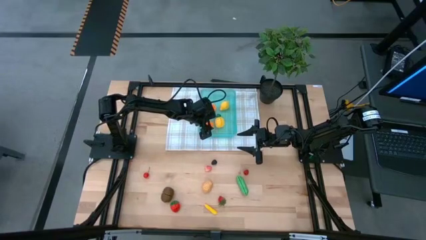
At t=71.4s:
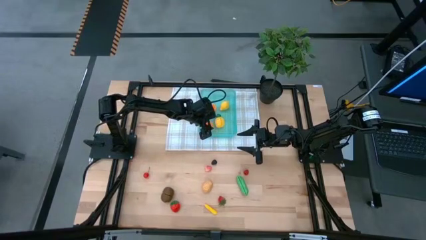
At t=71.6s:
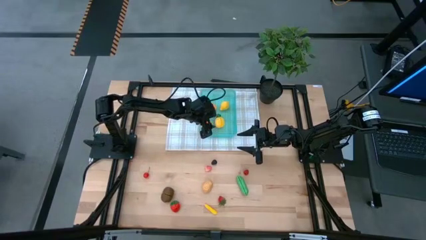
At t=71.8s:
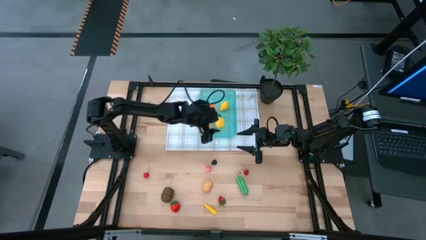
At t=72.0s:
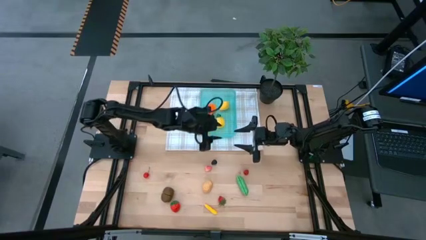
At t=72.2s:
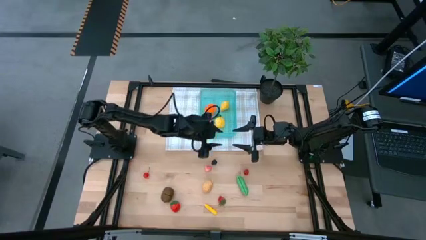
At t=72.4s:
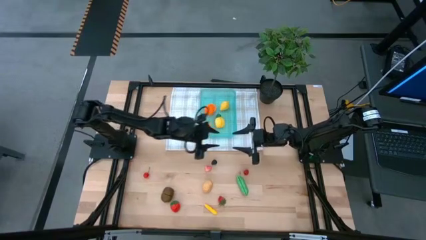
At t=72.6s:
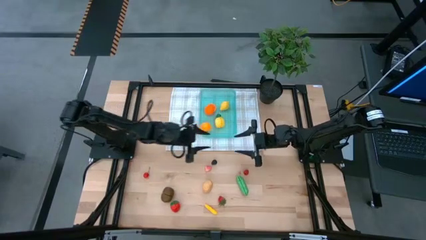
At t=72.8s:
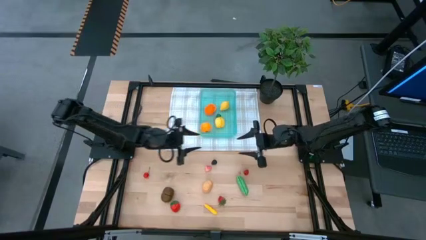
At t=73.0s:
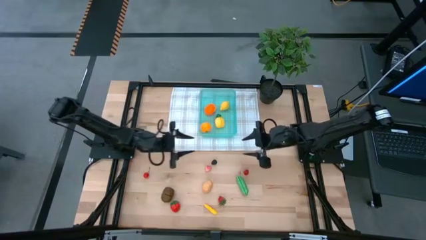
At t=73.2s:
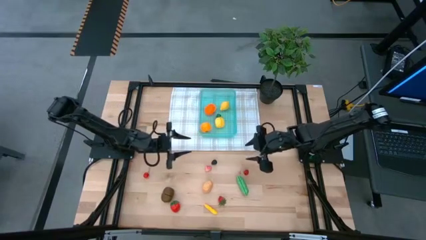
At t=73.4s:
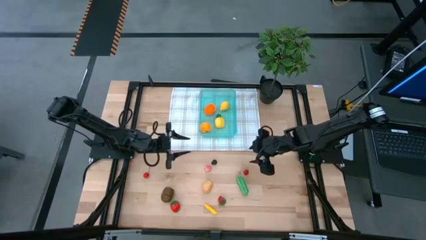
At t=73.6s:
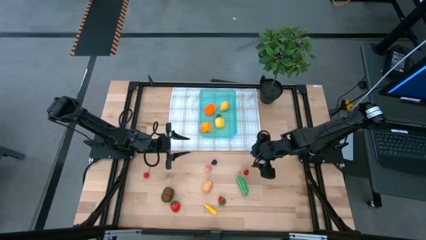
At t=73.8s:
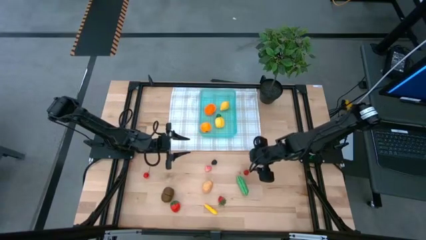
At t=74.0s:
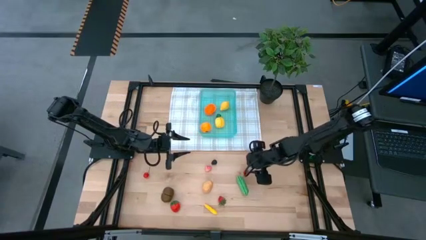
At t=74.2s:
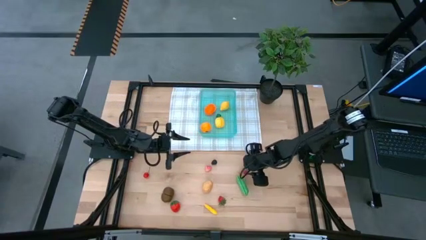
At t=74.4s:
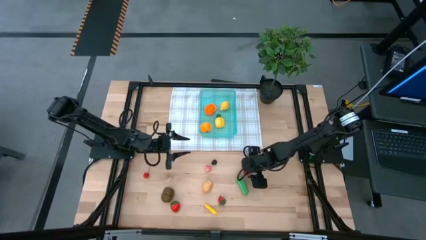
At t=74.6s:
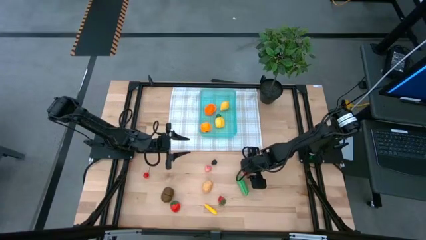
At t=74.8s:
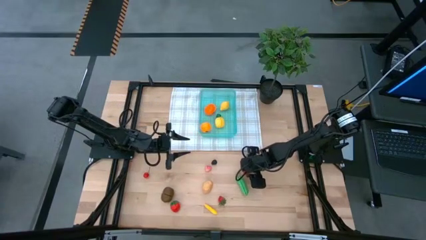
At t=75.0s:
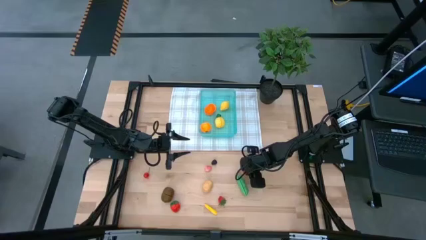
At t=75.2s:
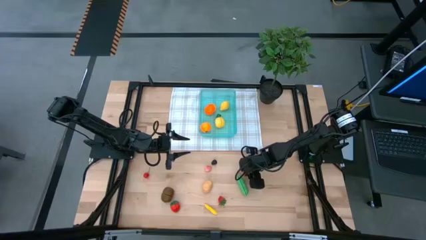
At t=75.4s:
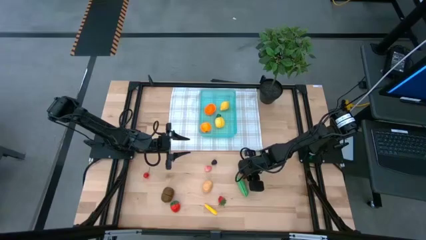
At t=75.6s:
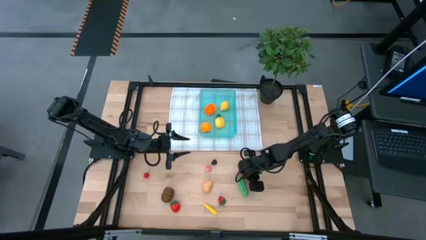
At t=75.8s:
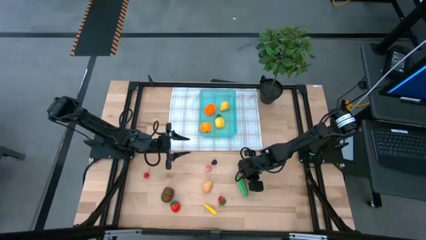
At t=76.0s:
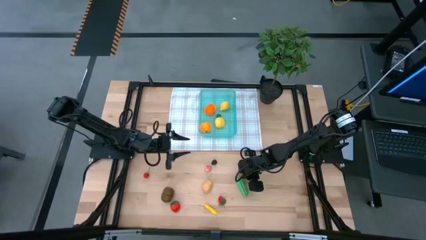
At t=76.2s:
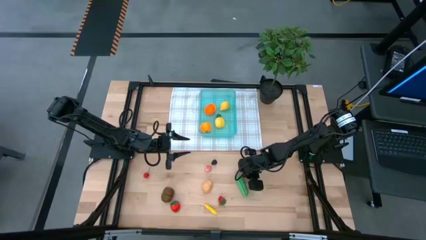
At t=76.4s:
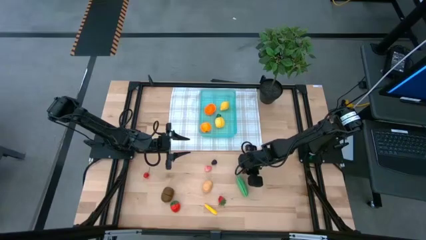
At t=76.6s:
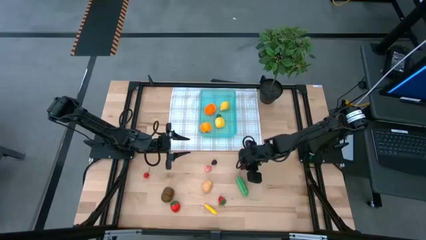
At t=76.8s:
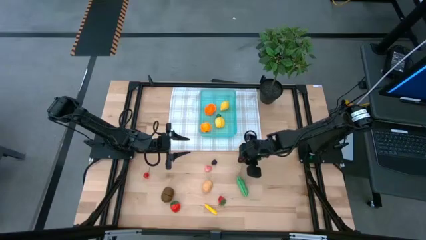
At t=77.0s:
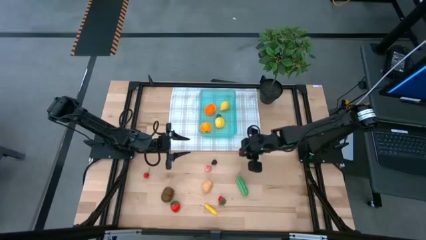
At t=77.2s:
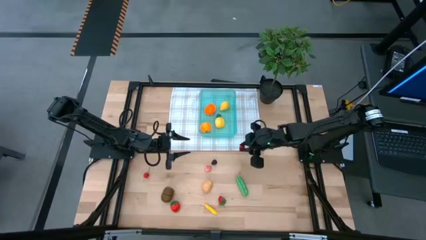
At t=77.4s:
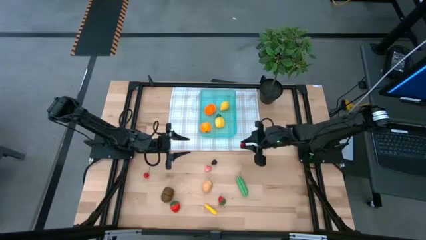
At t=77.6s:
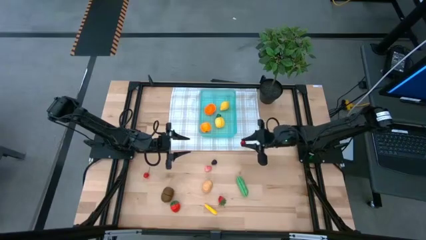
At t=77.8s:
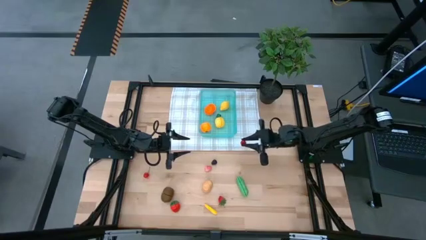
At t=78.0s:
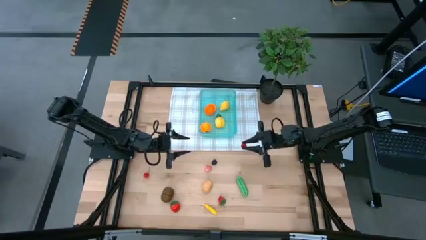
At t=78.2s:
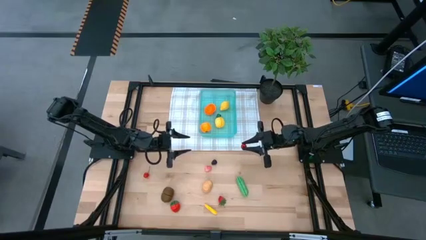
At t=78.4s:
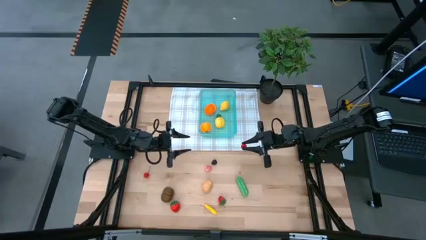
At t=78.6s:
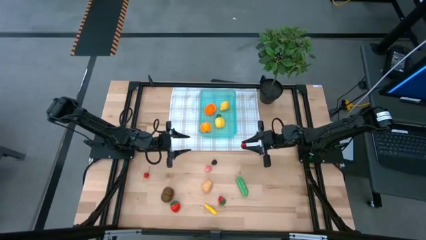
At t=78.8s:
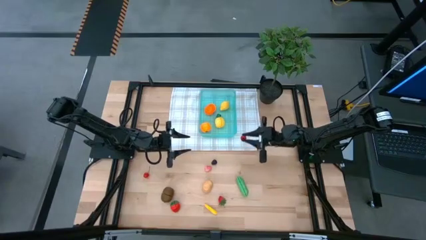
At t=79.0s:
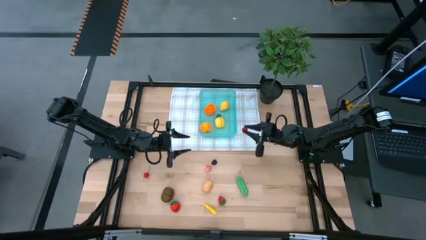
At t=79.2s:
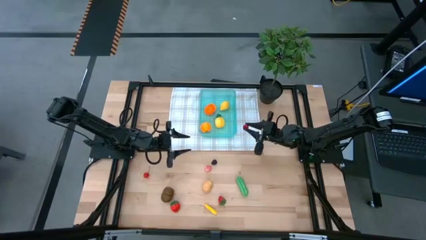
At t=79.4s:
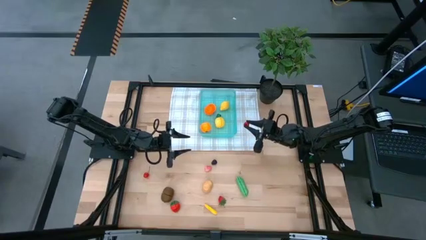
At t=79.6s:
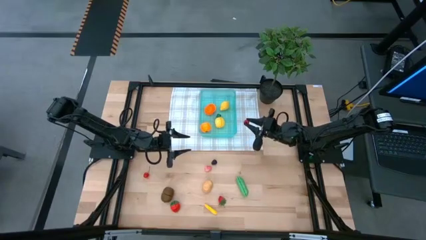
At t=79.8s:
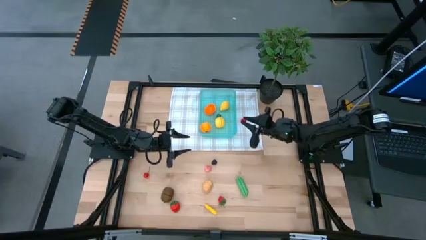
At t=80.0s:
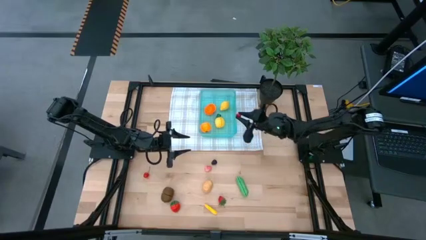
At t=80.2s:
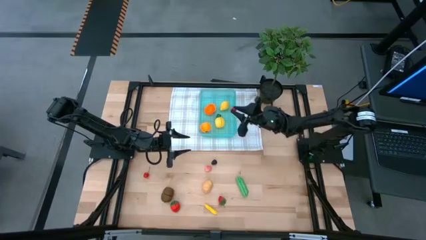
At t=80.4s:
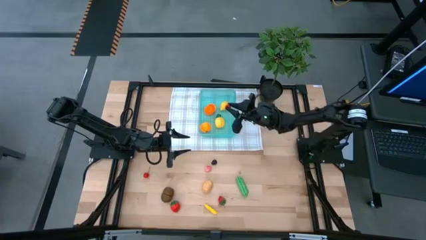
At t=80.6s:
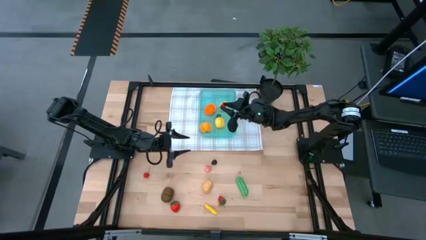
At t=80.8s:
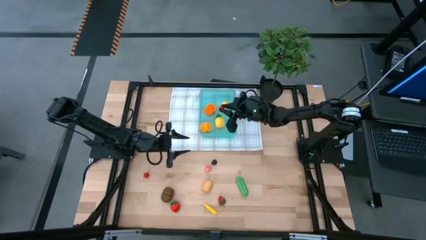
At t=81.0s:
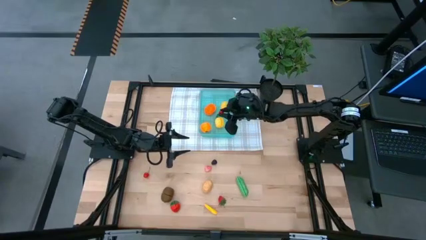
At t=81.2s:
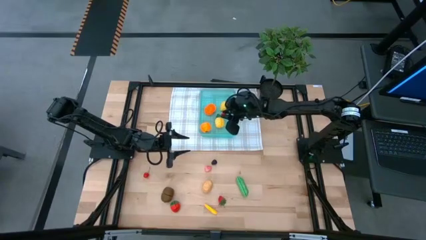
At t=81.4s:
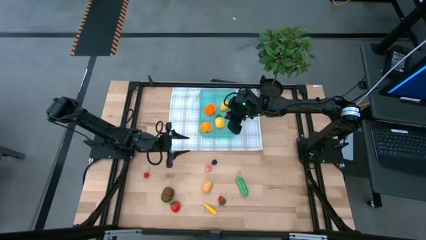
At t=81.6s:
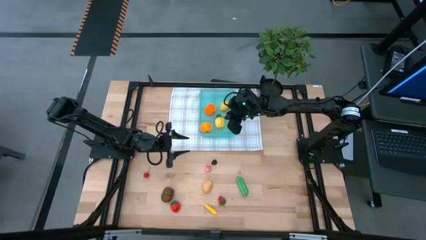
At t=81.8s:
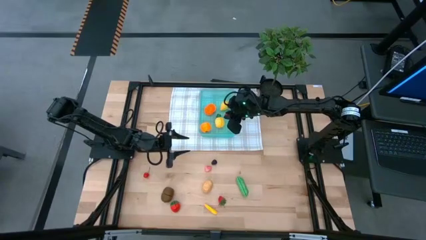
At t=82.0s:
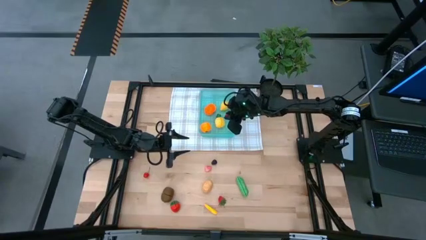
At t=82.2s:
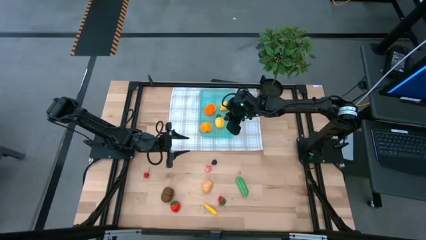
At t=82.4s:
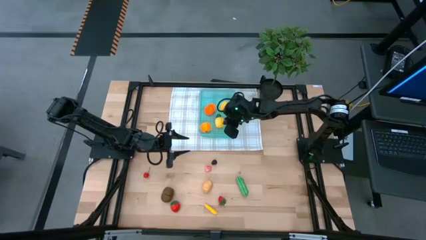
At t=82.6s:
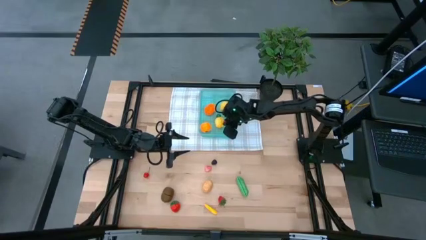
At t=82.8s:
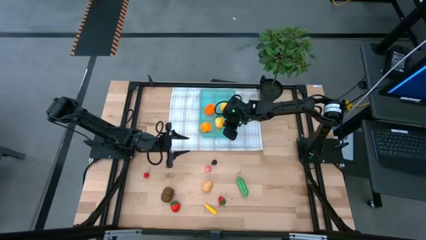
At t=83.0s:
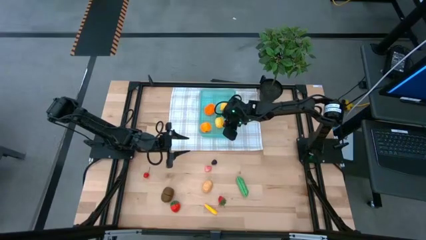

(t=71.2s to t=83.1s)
Task: Pick and placing Produce into tupperware
Put the red raspberry into the green bin

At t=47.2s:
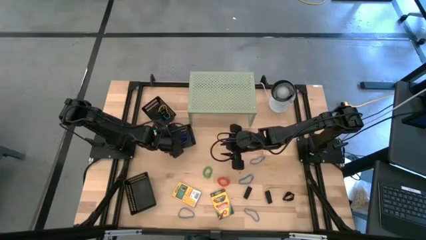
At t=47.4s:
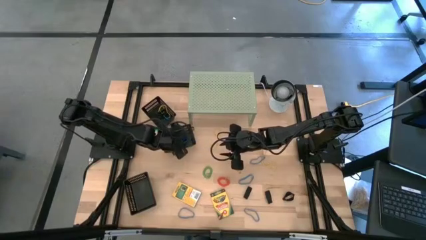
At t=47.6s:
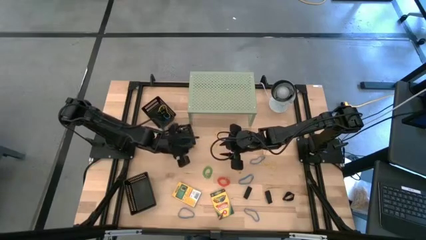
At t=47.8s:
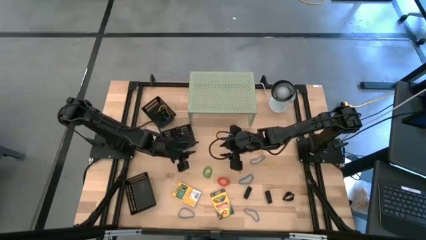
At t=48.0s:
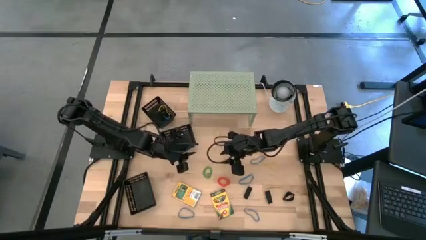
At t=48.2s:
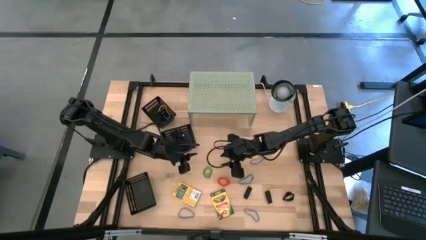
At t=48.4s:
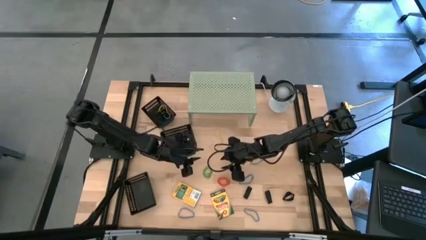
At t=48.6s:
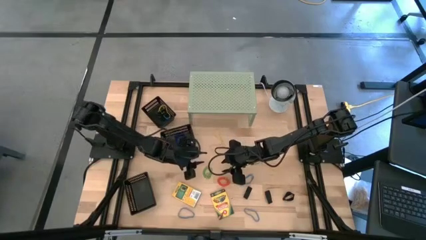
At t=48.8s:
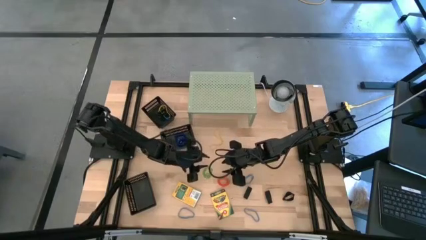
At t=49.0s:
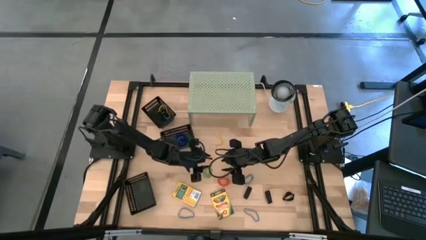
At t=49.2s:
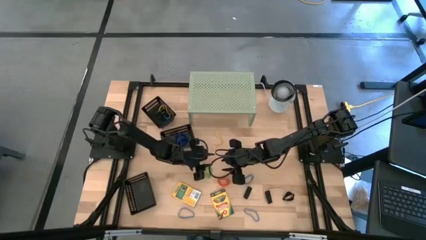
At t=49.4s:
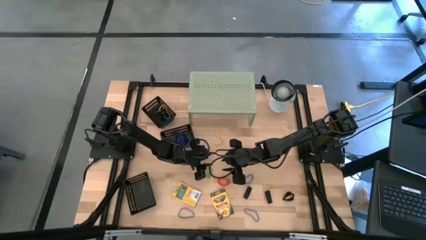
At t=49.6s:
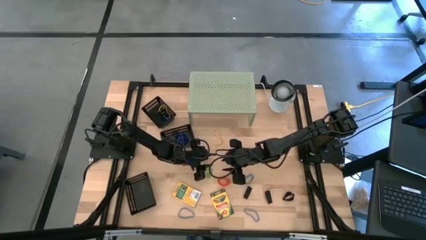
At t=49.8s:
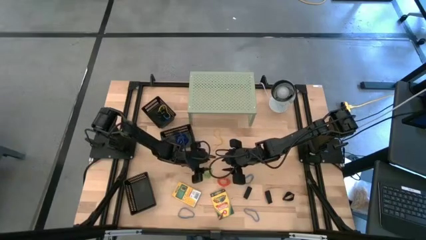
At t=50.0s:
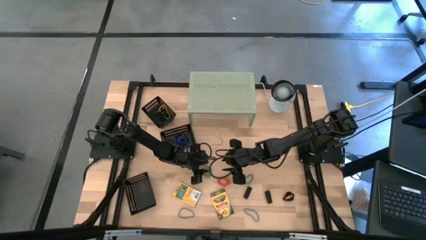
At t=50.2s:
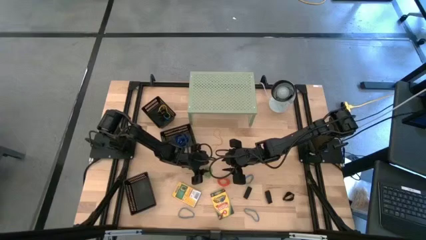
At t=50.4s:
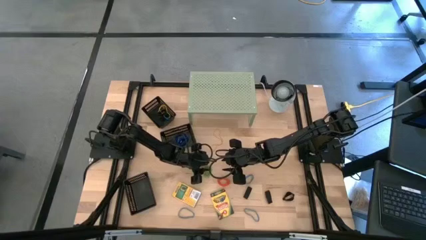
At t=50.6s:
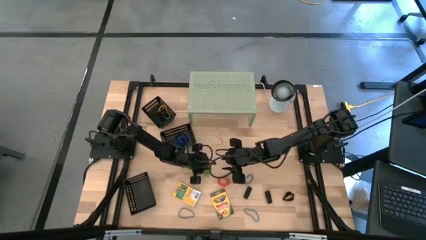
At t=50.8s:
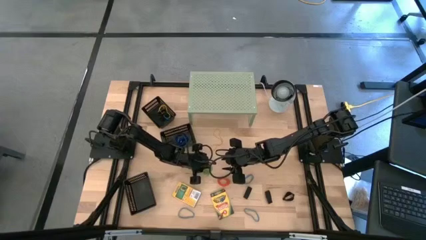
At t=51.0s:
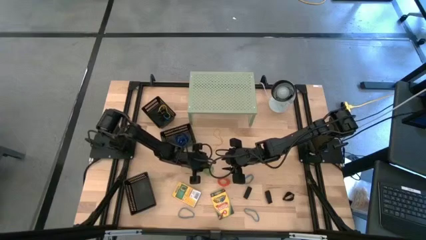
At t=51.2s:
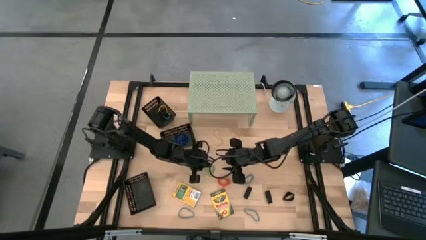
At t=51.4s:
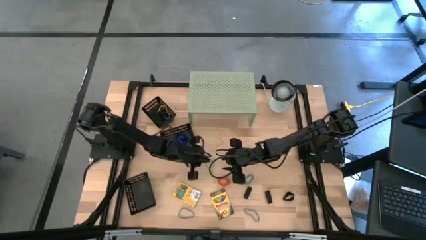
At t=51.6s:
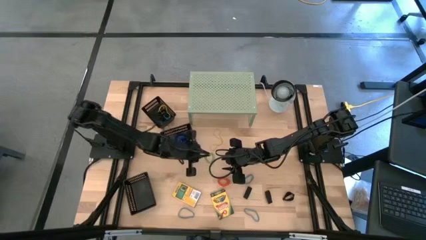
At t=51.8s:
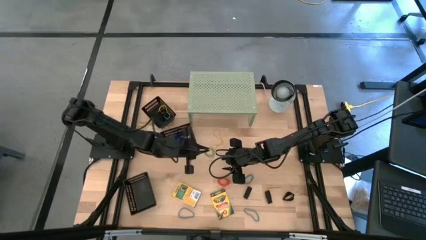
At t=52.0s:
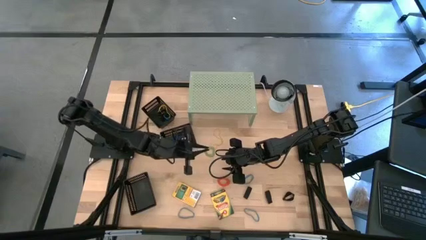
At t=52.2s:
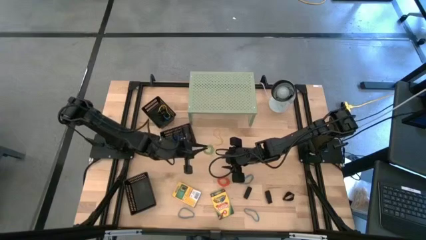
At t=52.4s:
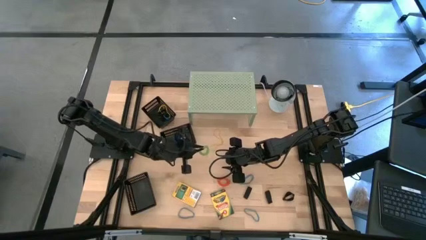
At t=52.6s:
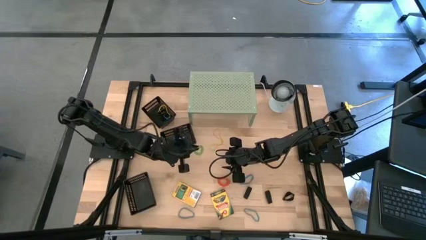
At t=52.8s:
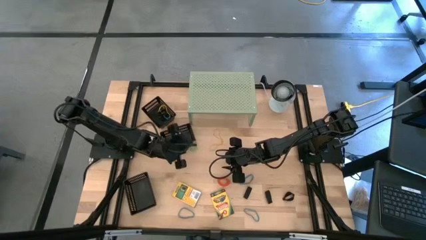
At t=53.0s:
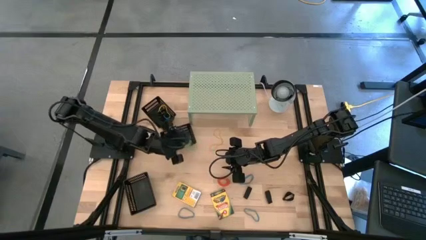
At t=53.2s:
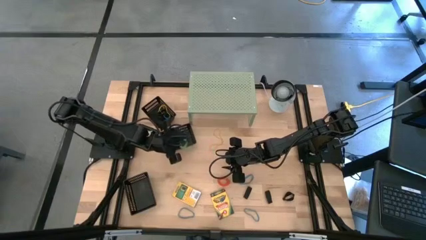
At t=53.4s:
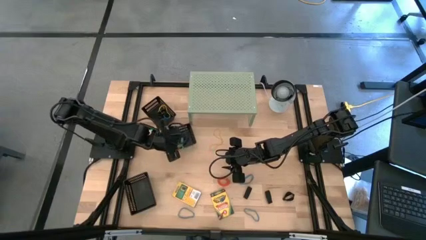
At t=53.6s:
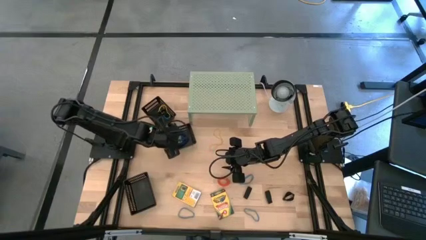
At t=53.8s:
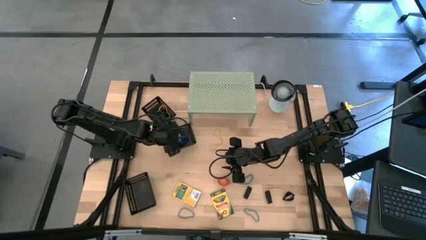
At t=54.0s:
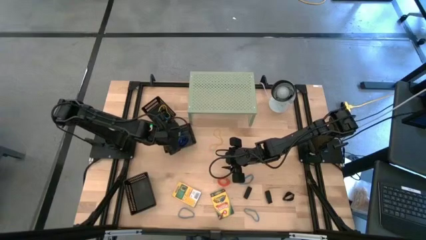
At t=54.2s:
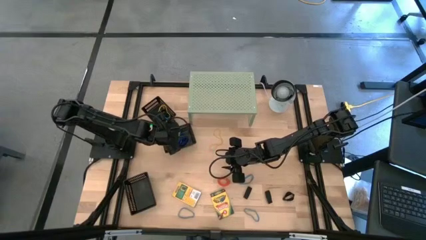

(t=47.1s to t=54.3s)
Task: Pick & Place Office Desk Supplies
Put the green spring keychain into the middle black bin
